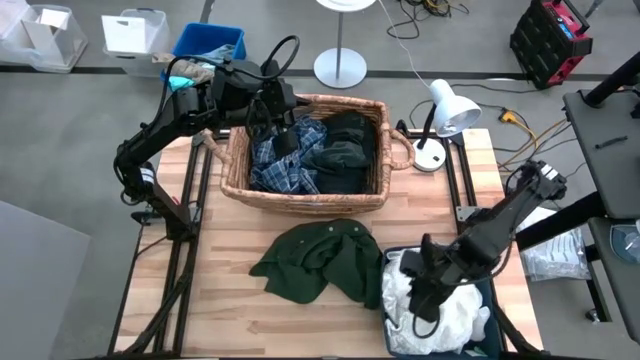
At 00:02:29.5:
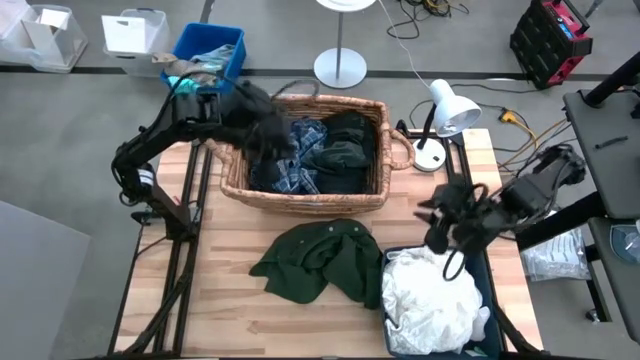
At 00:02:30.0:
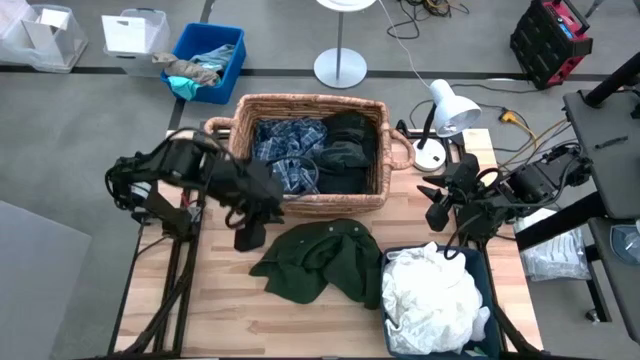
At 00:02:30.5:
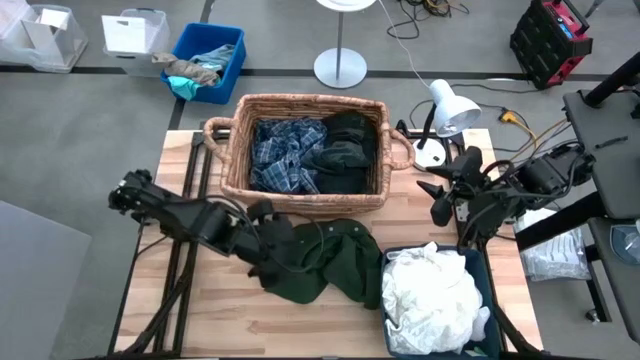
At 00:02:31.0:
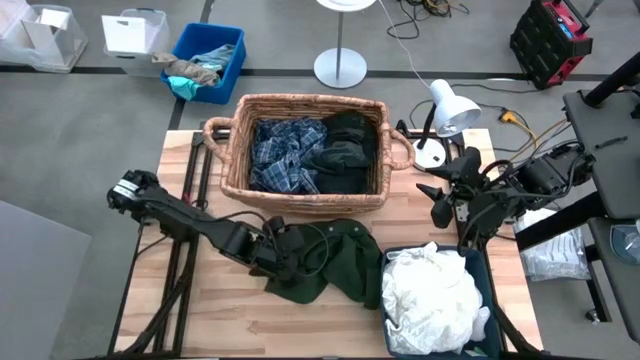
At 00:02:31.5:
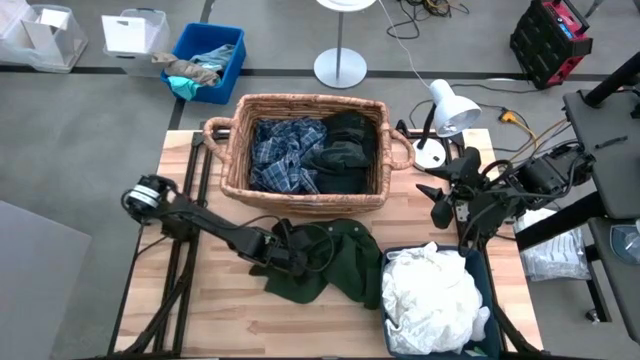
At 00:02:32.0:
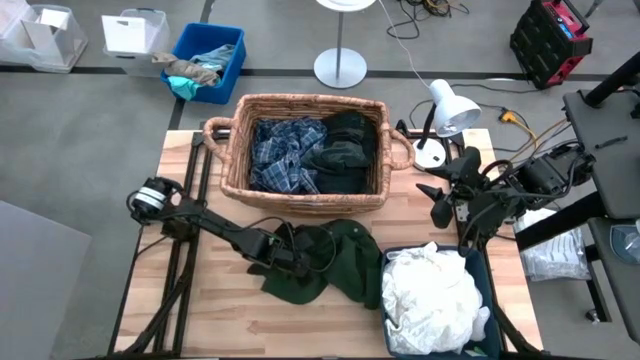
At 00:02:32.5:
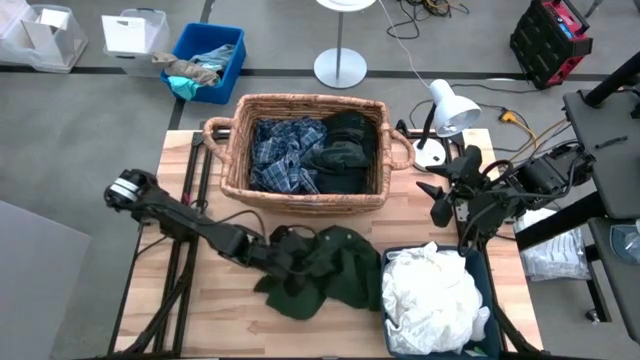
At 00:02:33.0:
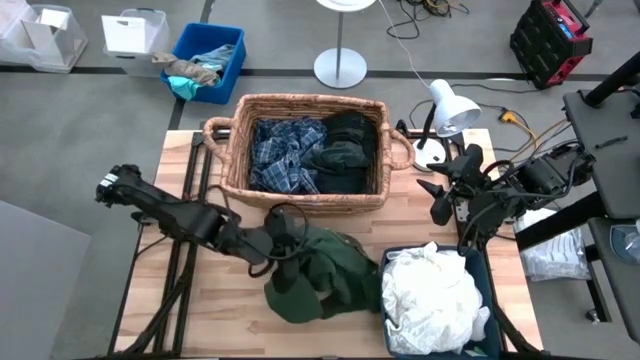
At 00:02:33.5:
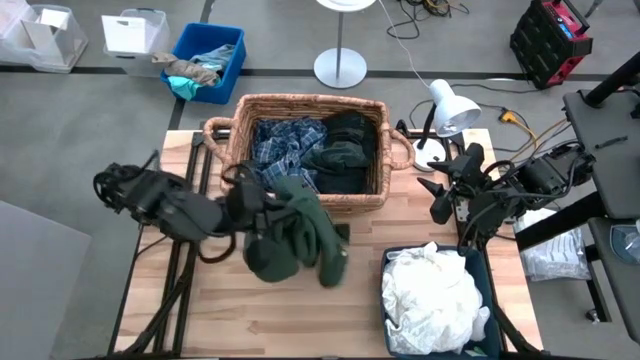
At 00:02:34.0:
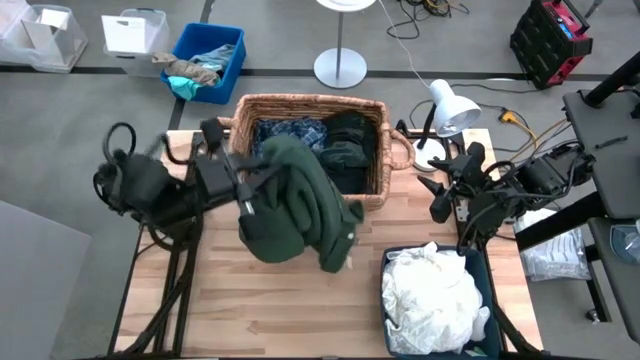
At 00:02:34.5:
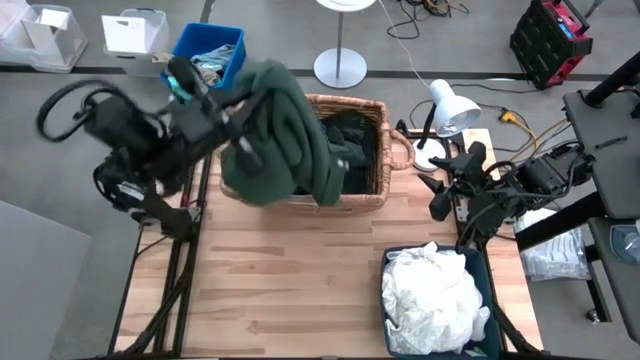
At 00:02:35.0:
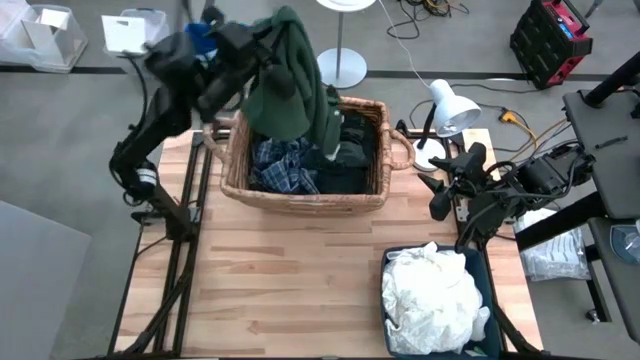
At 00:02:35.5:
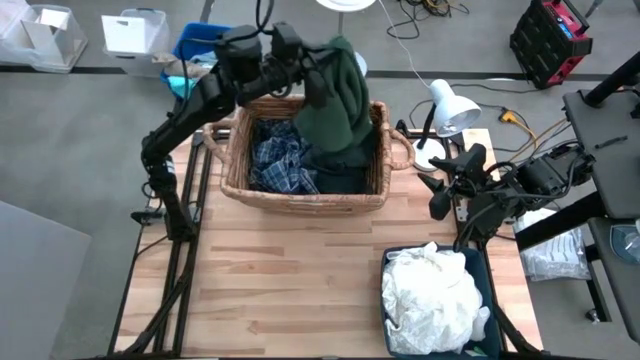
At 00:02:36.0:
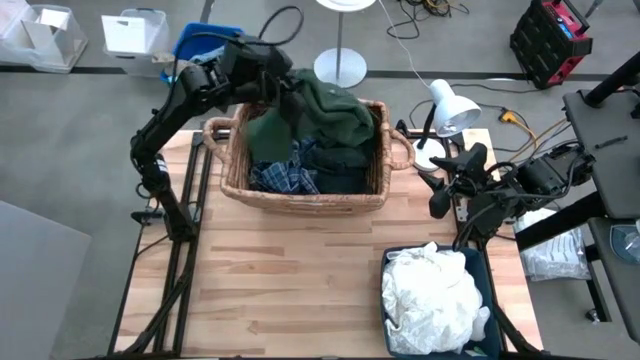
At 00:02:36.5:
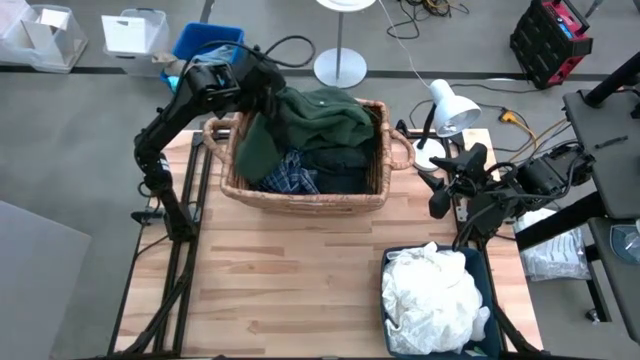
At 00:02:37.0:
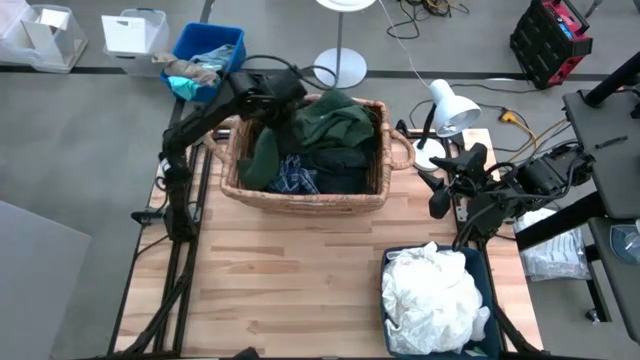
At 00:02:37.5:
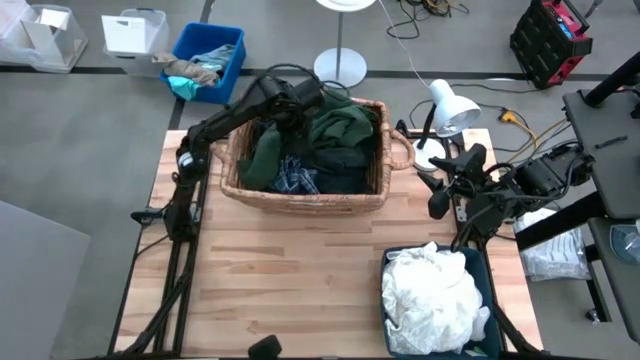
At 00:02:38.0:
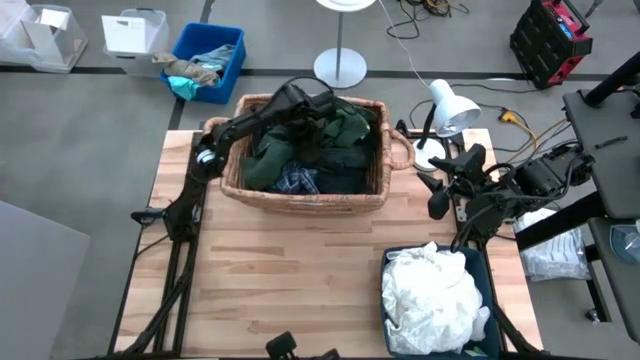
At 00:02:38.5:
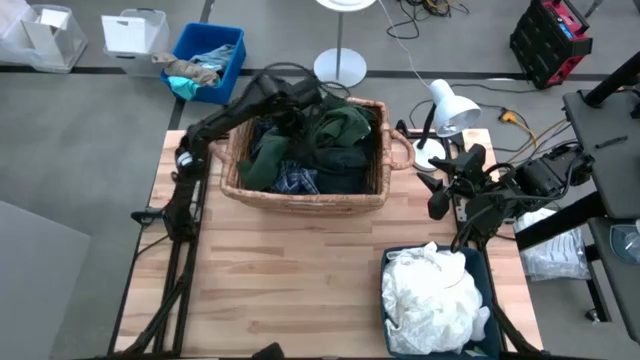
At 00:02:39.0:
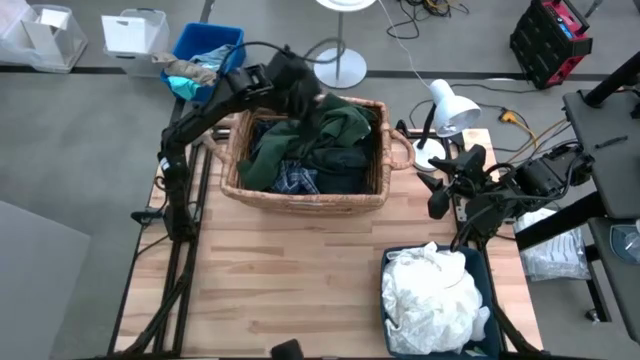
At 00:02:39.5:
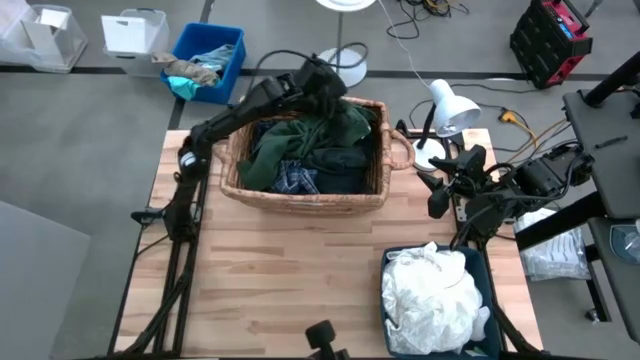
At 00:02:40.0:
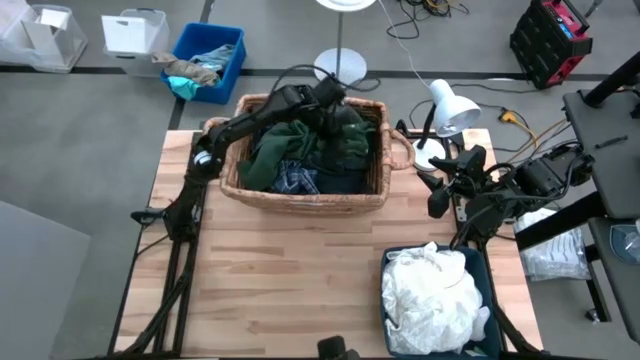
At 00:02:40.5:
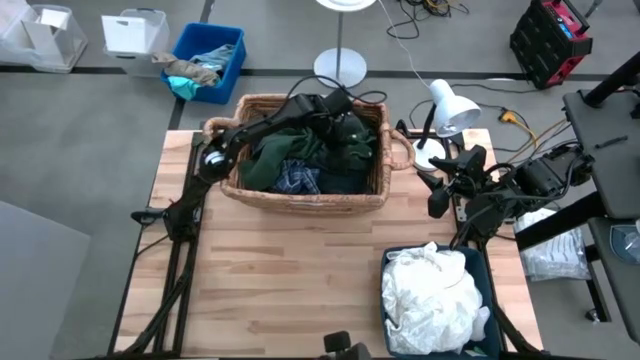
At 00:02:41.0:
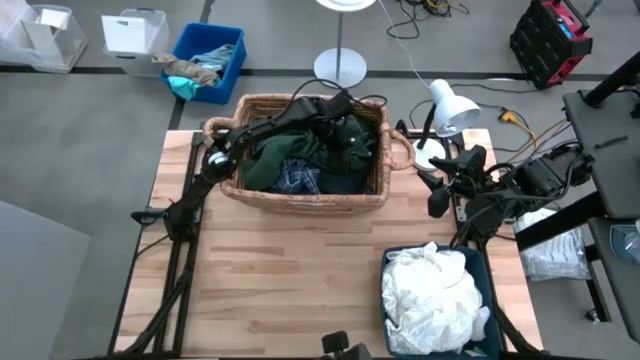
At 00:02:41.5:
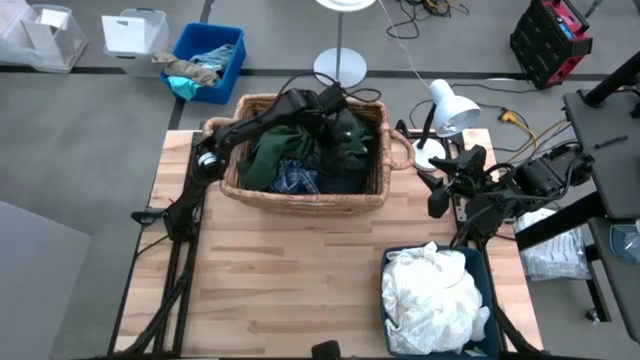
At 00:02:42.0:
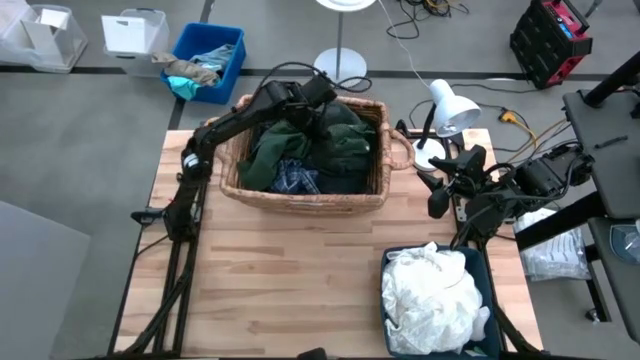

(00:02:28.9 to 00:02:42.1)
Task: Sort clothes
Put the dark green polo shirt into the brown laundry basket

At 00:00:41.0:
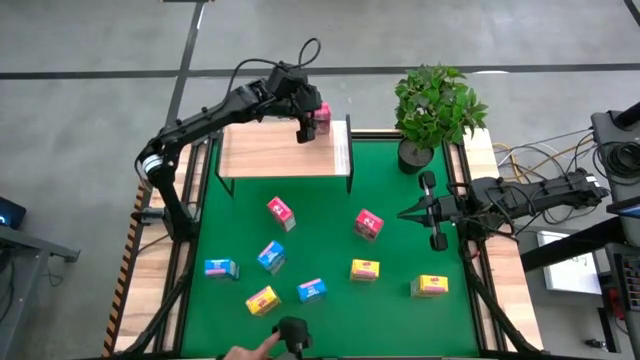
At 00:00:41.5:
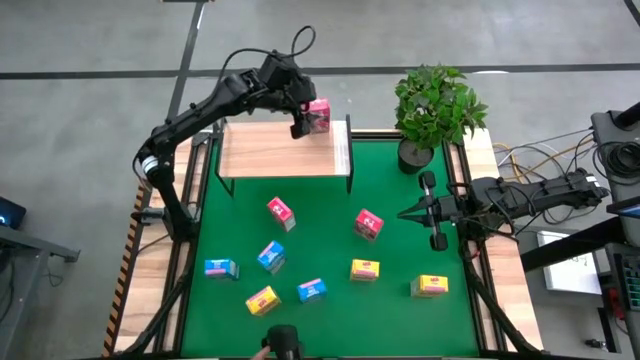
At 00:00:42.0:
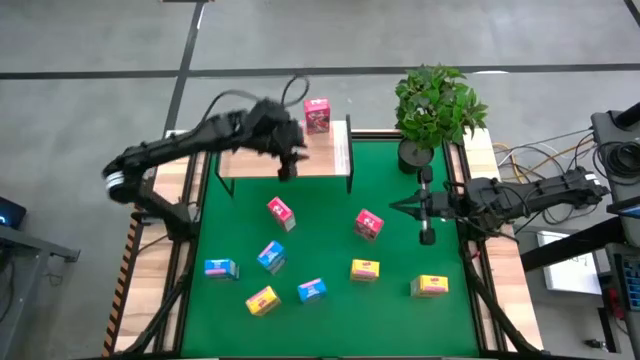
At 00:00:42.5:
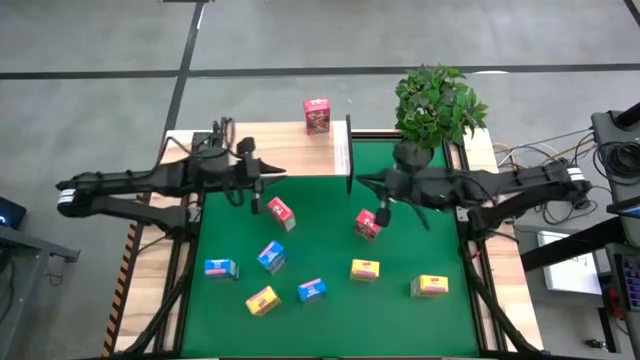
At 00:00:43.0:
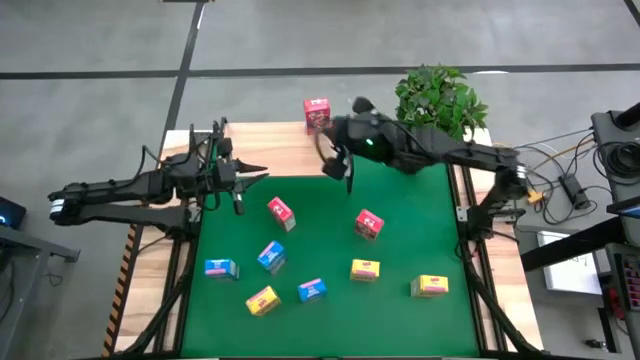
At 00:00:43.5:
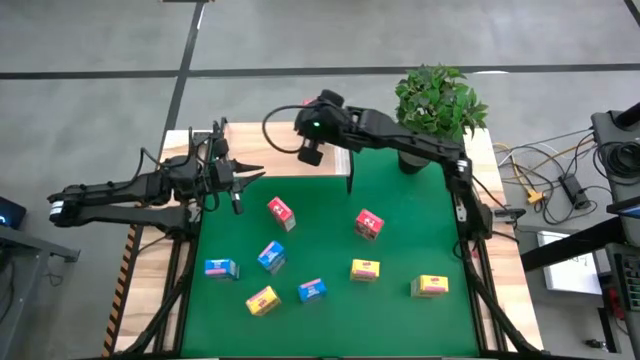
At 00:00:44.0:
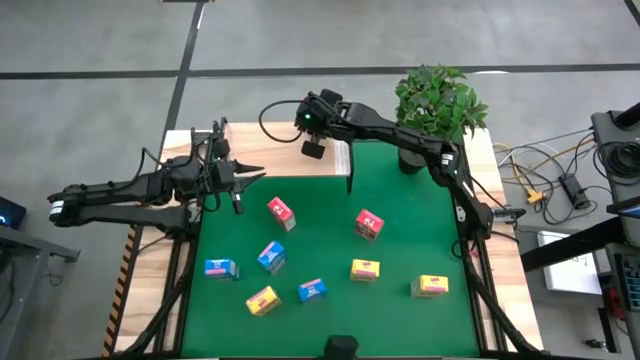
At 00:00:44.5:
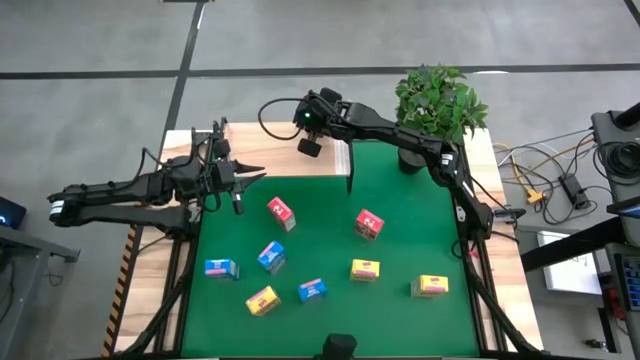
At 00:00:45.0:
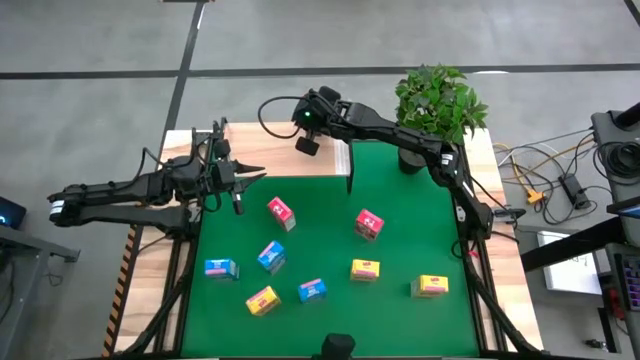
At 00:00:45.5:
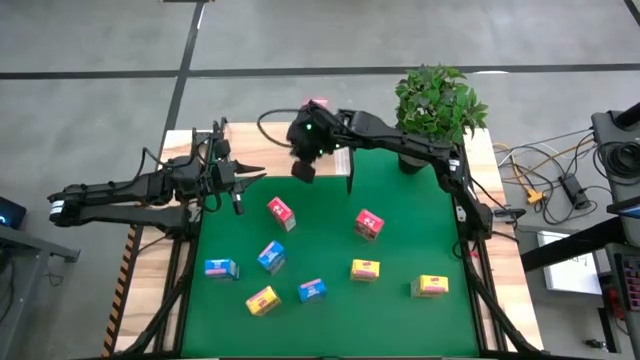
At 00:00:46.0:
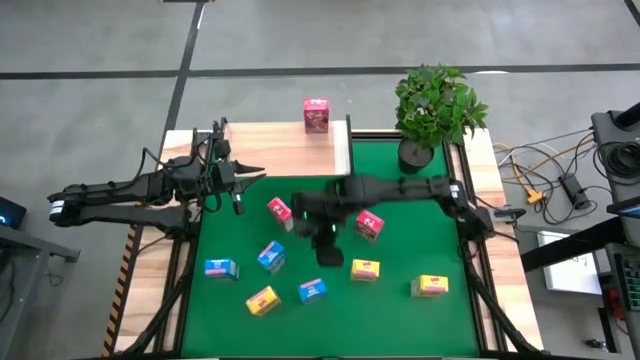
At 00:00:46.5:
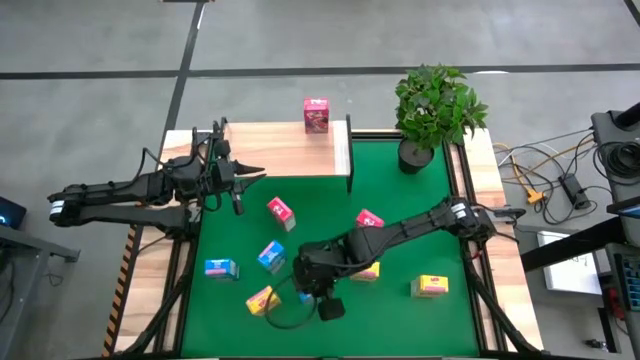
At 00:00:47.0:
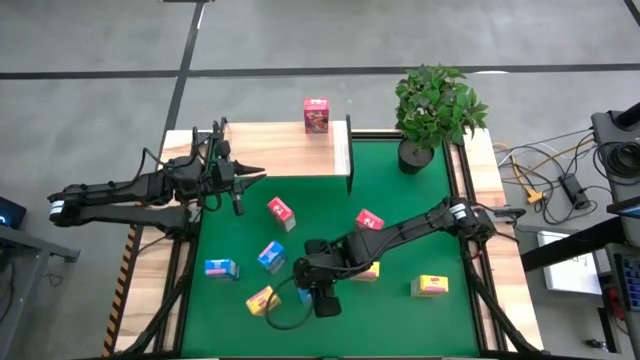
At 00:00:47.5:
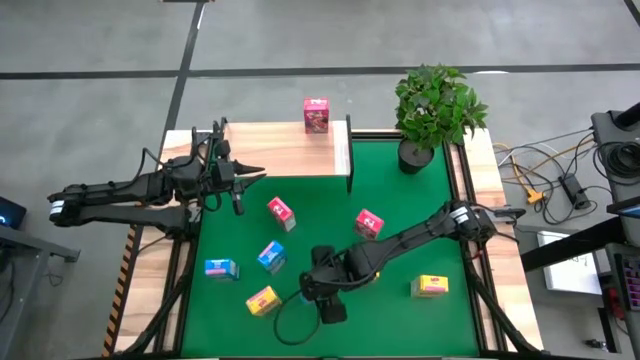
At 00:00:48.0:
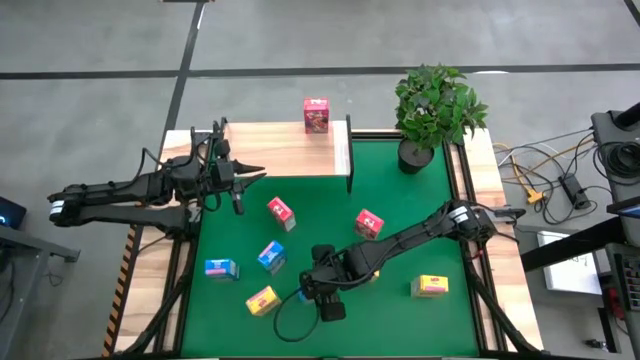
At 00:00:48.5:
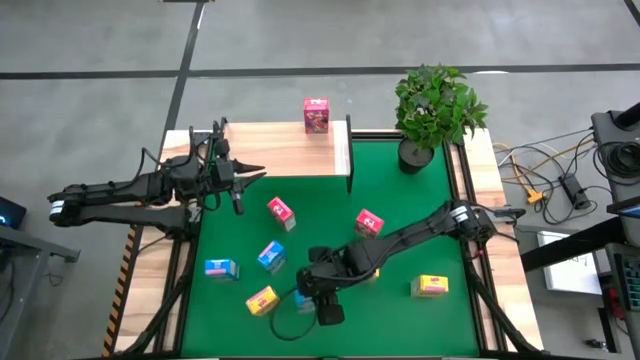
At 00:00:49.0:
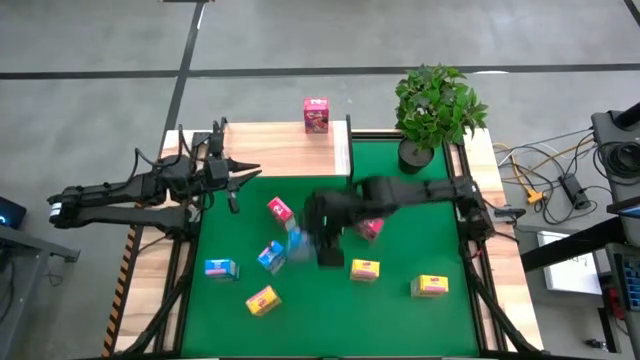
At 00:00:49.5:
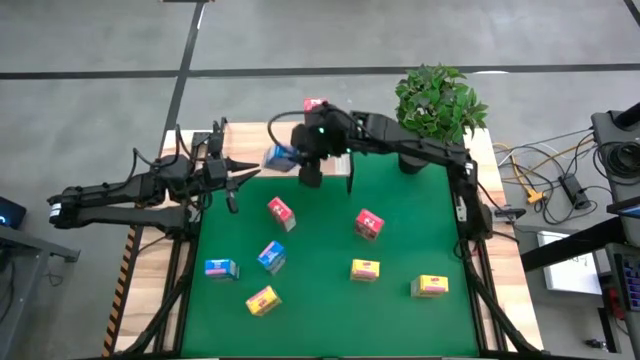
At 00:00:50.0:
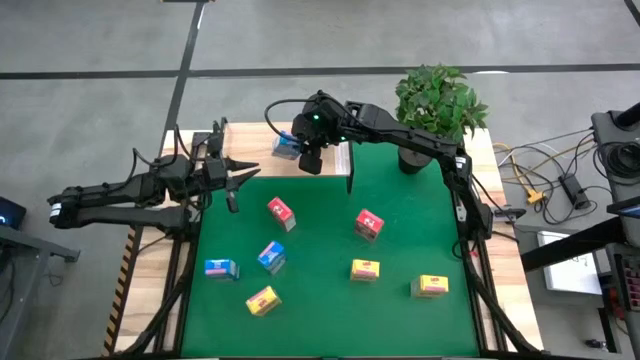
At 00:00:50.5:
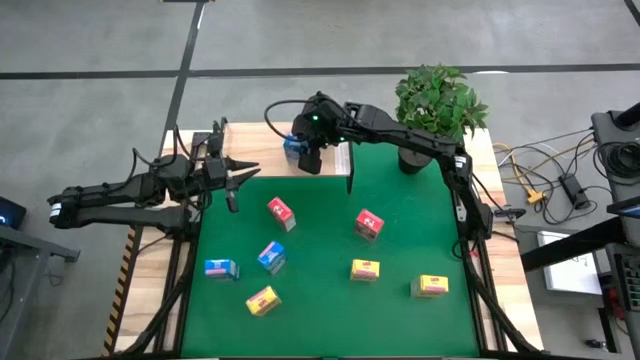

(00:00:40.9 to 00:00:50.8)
Task: Stack cereal on shelf
Put the right blue cereal on the shelf
